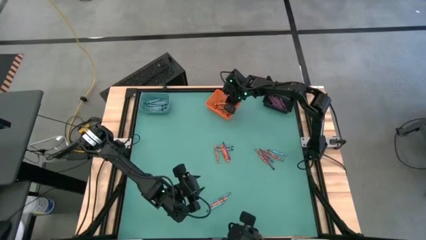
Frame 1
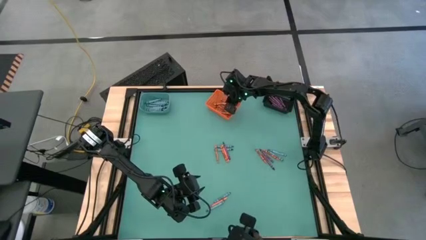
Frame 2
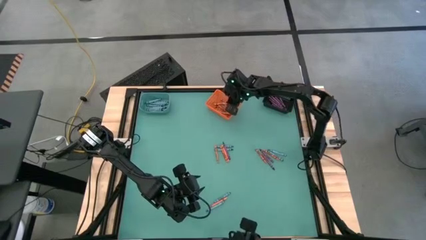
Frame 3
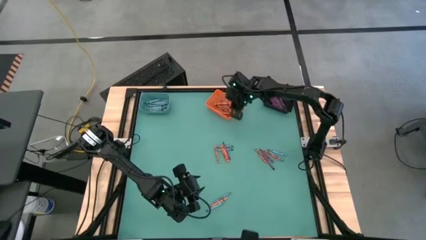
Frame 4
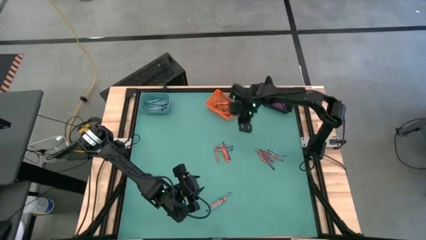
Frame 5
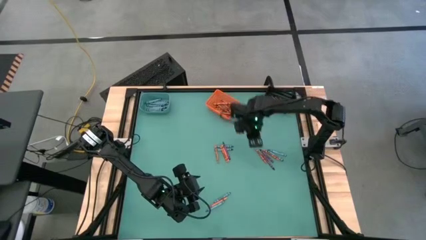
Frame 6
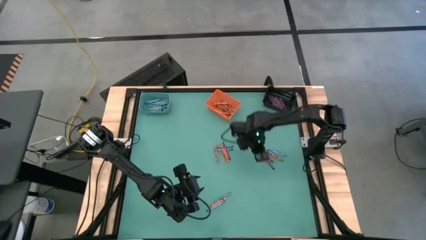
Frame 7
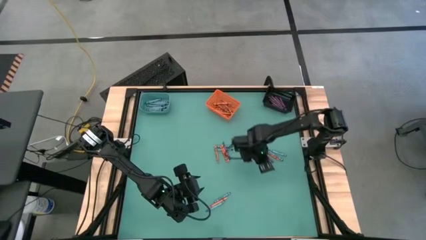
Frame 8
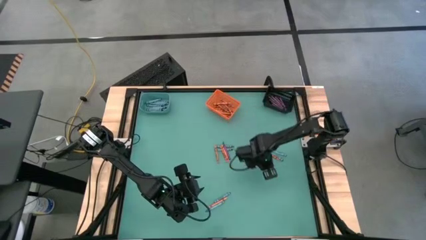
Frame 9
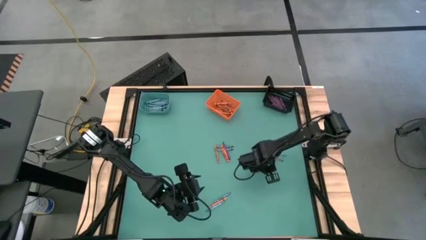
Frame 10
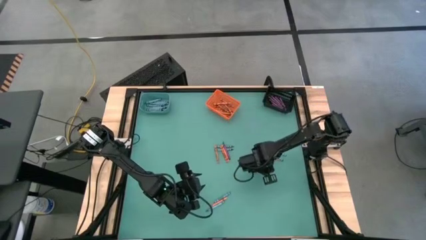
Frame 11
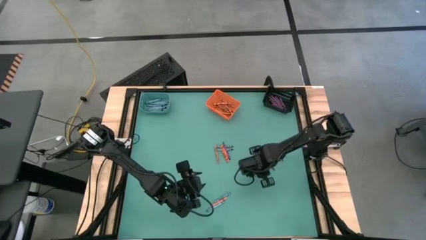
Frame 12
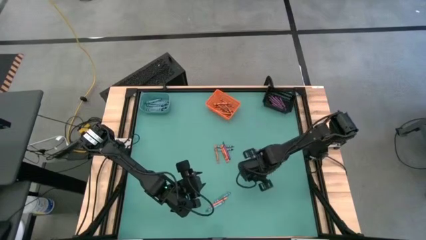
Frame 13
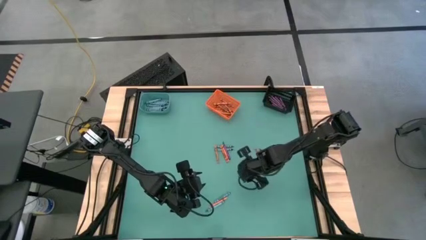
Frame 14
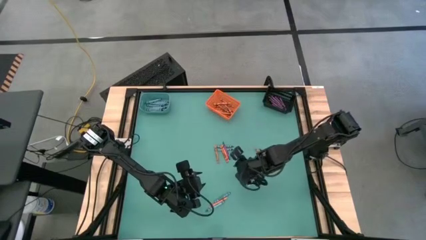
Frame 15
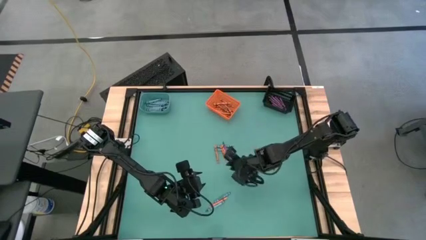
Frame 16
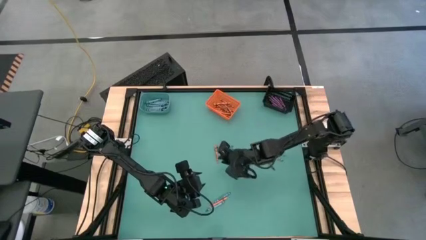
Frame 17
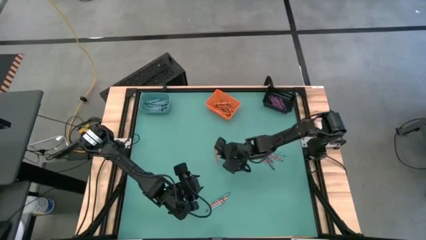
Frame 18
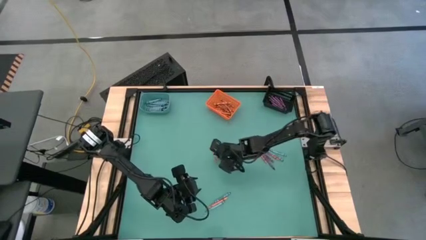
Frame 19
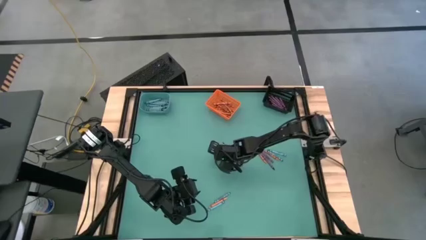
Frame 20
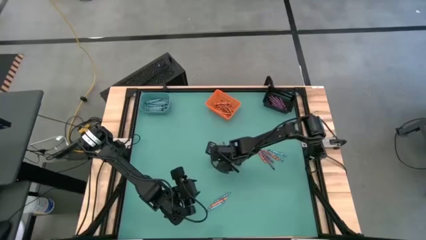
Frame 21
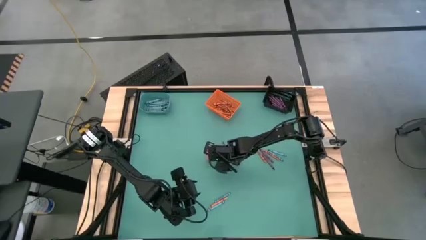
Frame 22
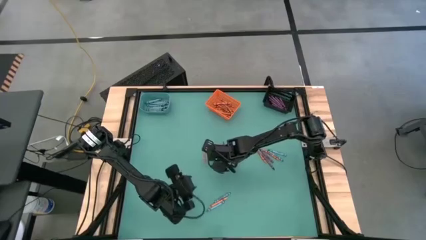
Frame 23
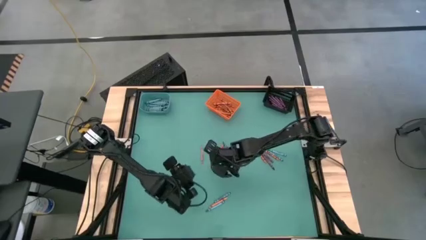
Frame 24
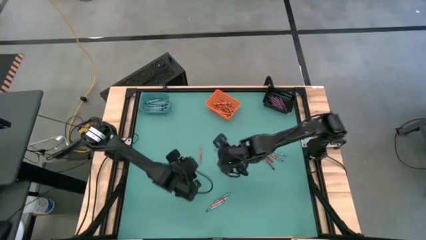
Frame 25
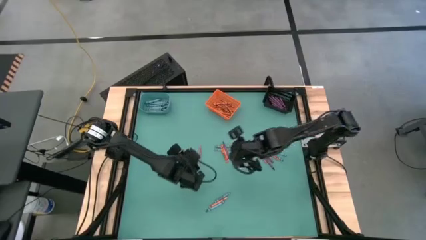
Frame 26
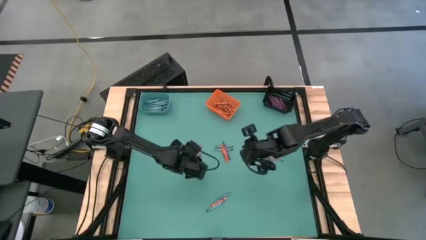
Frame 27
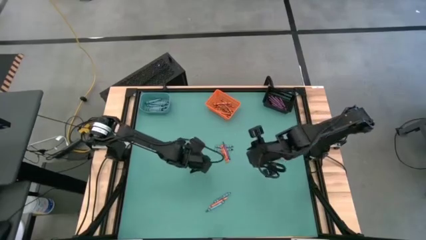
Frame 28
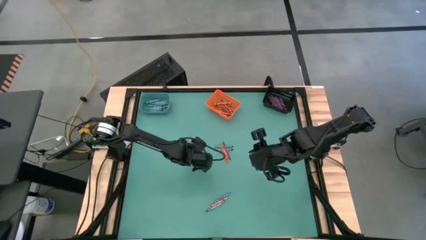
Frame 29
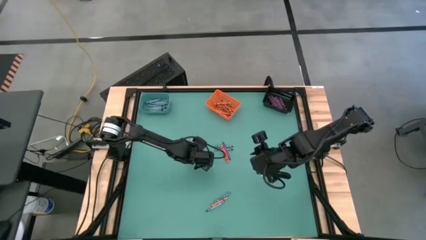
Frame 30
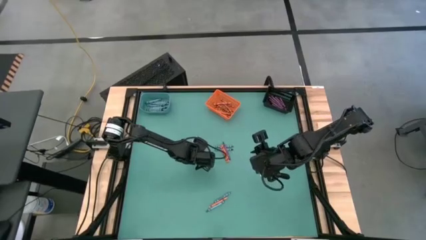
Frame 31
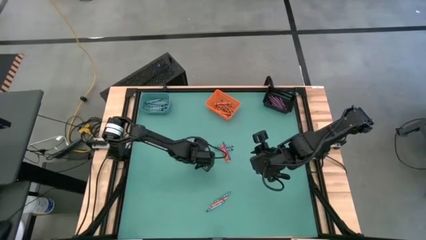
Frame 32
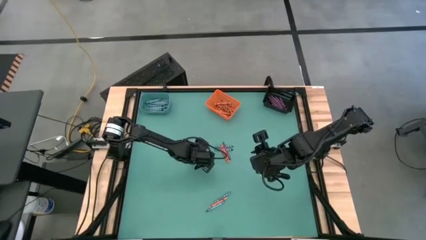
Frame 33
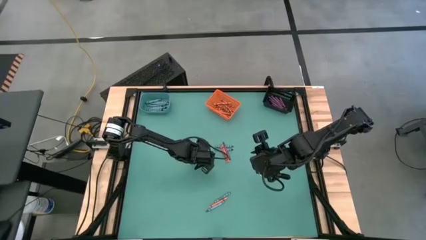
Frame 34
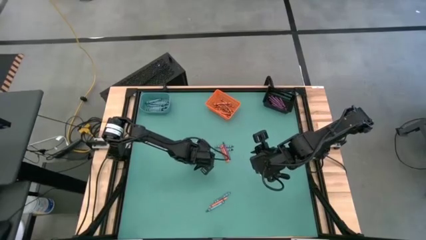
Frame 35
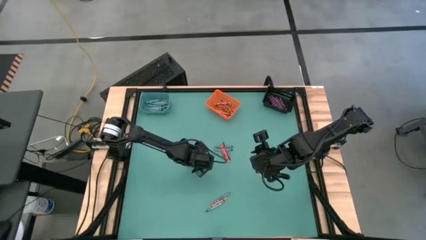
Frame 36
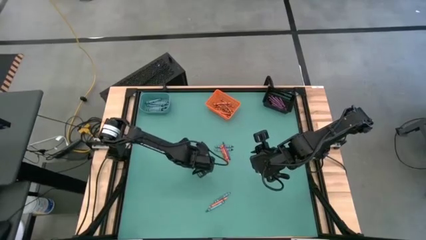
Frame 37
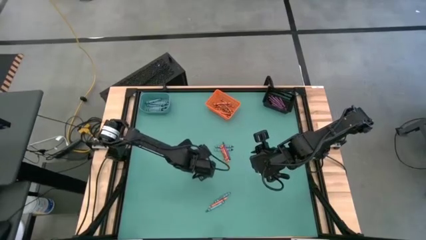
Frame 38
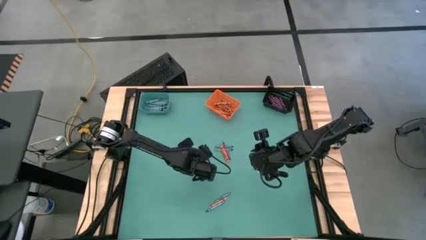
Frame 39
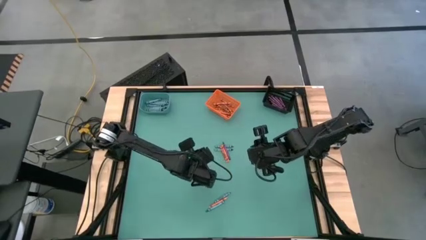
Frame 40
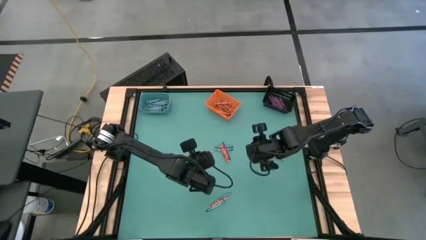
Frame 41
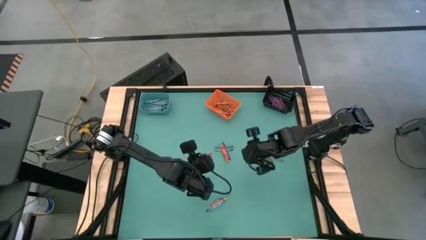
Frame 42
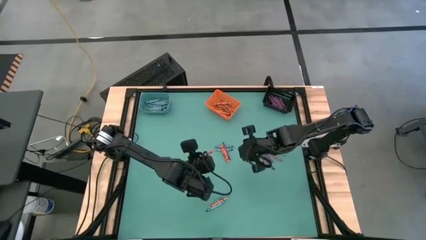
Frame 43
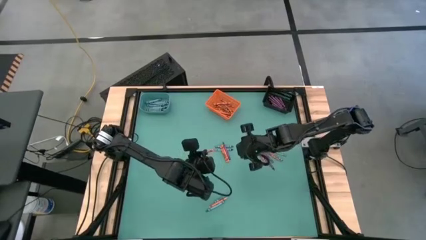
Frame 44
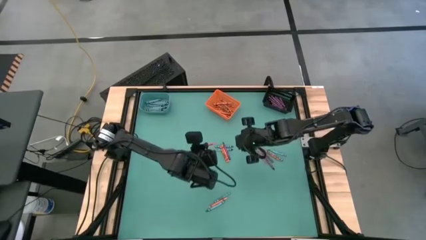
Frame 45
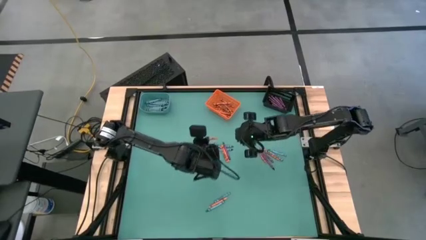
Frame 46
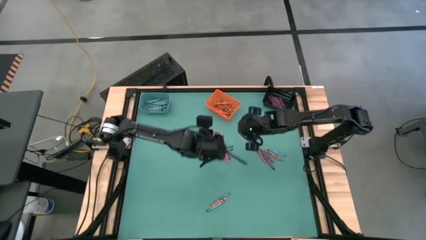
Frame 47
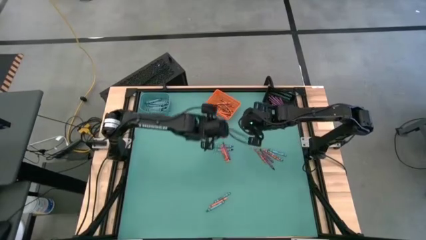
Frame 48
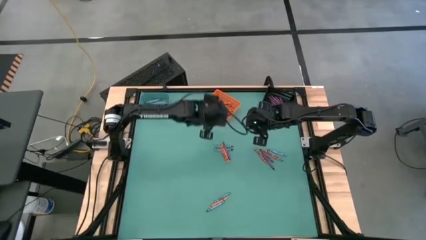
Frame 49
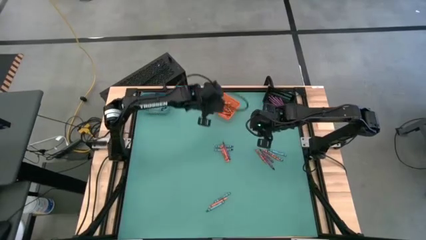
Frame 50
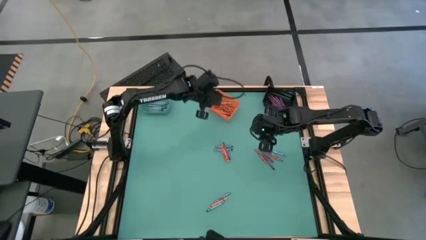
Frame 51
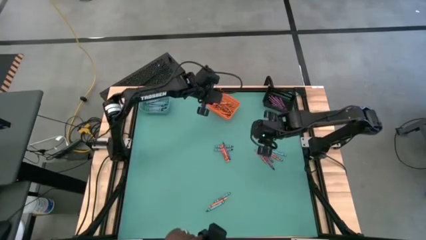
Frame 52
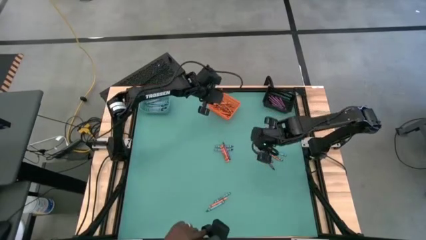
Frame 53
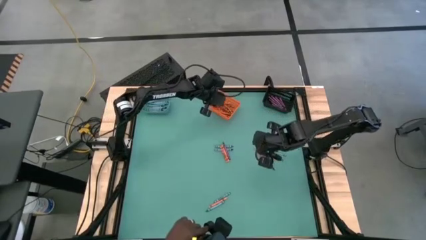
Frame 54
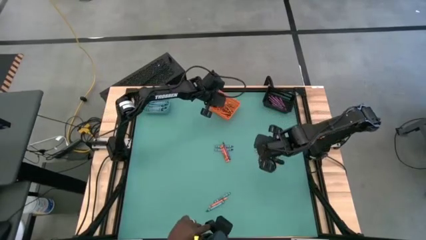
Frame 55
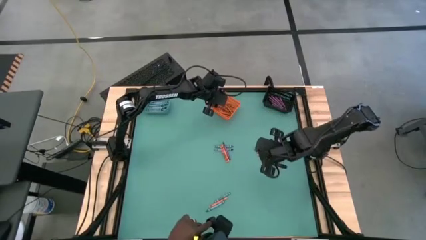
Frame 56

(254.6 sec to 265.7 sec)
Task: Sort crayons
Put the orange crayon into the orange bin

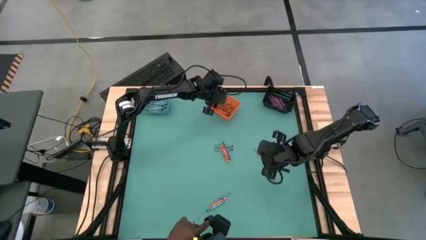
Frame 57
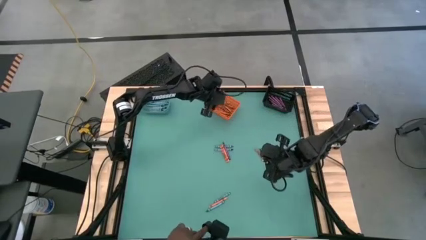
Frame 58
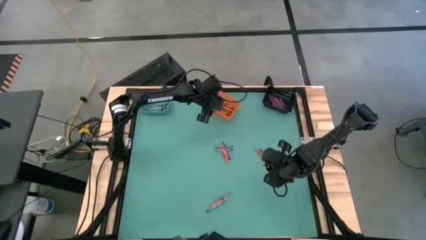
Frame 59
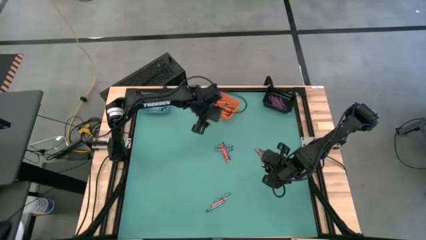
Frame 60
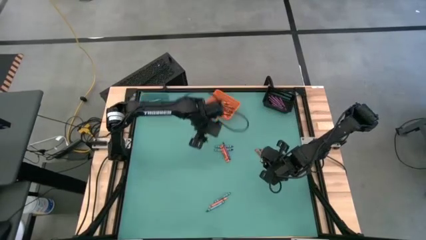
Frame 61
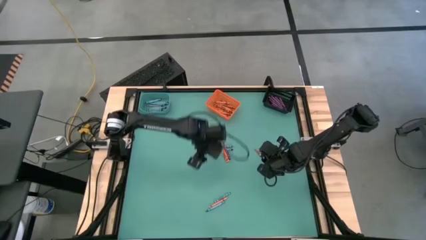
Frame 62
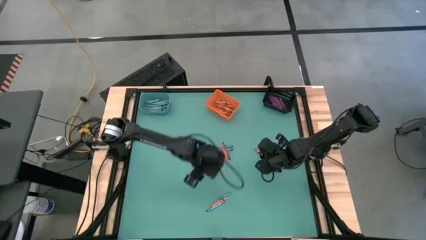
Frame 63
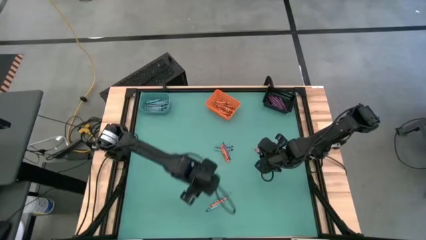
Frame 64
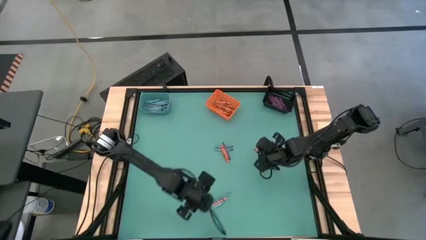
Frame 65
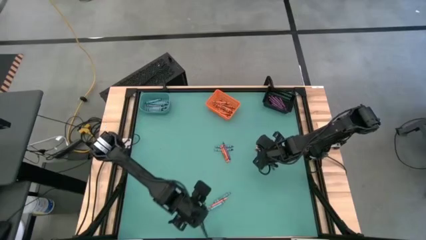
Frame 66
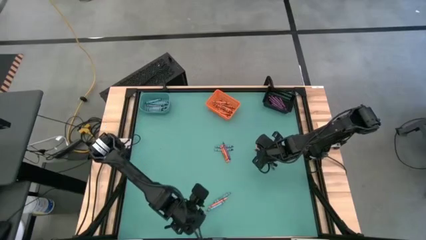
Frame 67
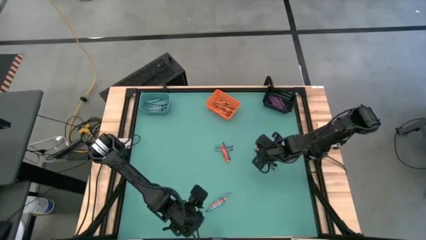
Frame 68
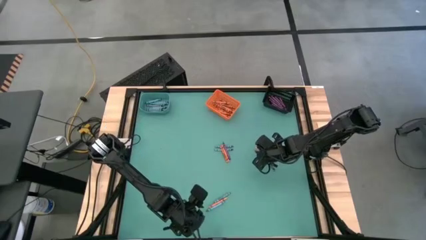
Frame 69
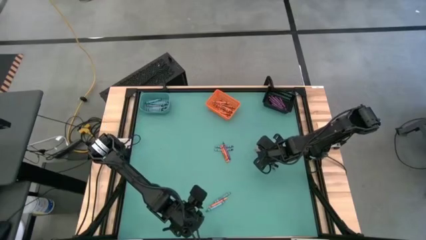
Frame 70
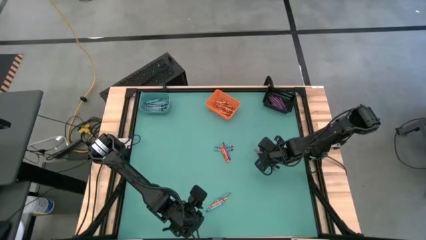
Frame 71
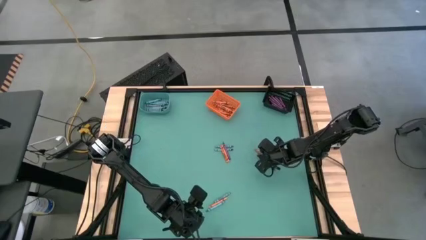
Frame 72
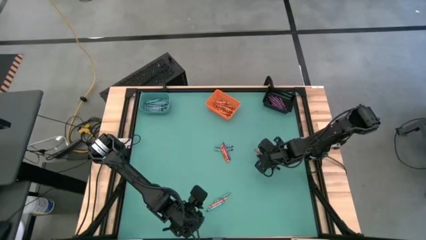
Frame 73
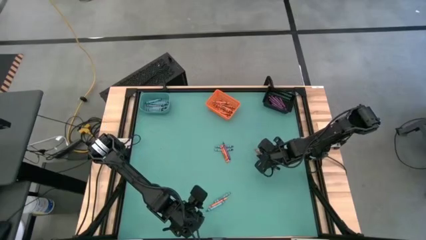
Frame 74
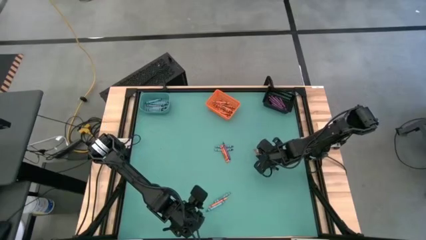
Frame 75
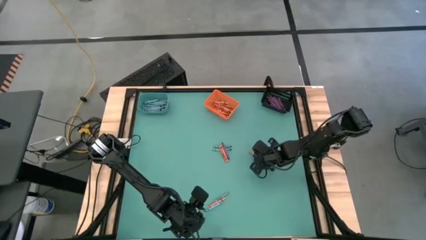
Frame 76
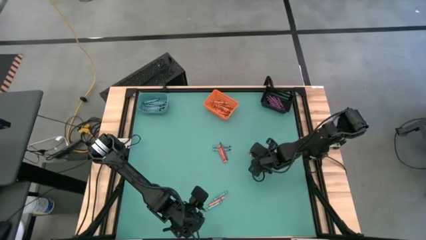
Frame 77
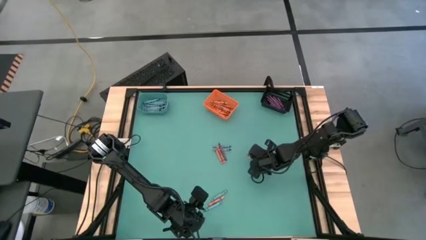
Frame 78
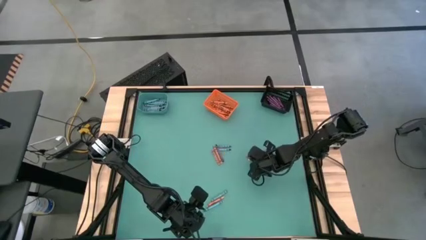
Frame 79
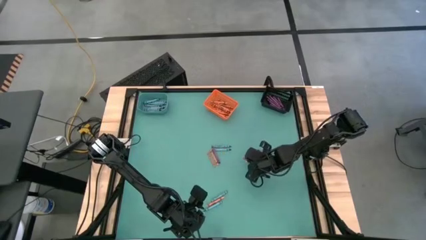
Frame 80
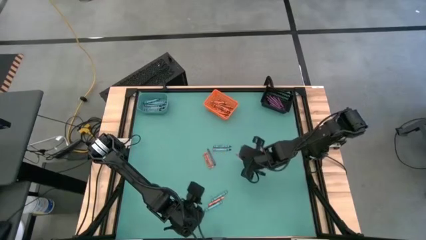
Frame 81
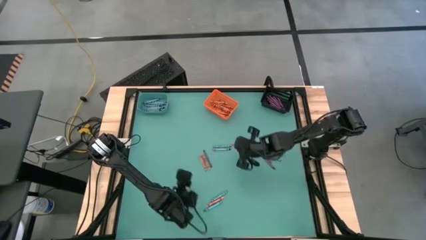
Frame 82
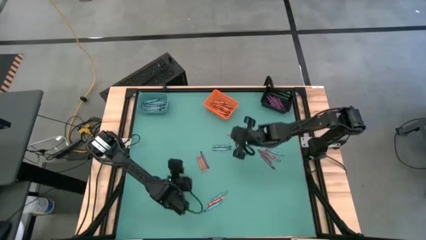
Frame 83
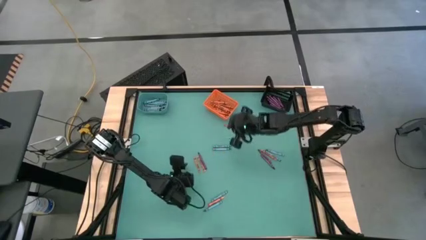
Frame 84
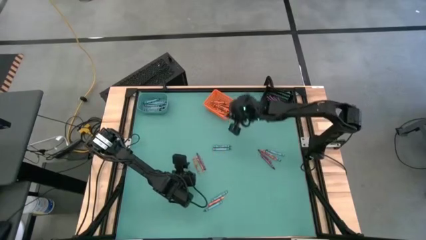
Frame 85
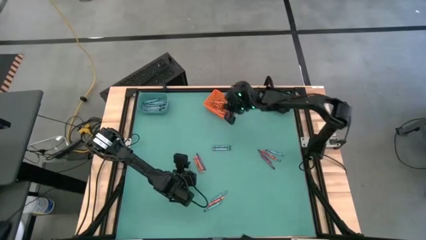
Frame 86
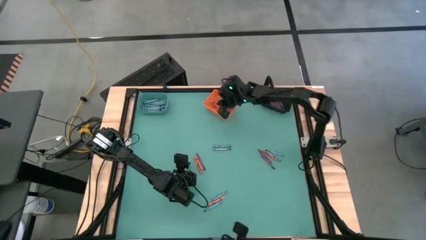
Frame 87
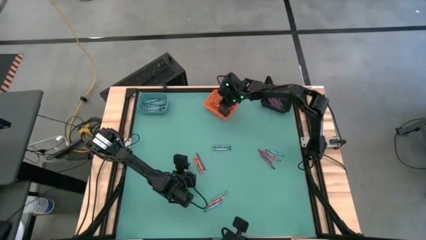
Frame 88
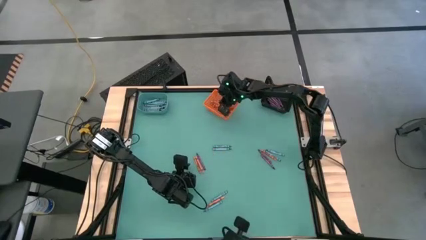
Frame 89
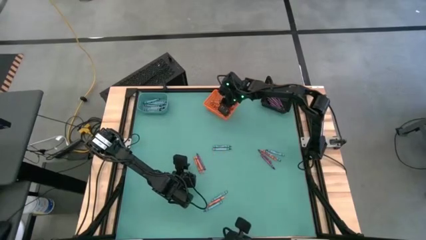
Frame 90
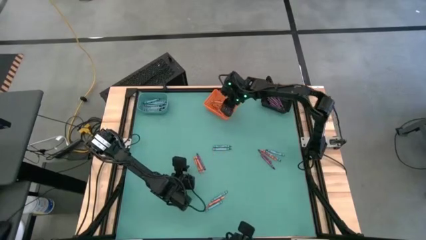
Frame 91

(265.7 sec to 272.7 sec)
Put the orange crayon into the orange bin
